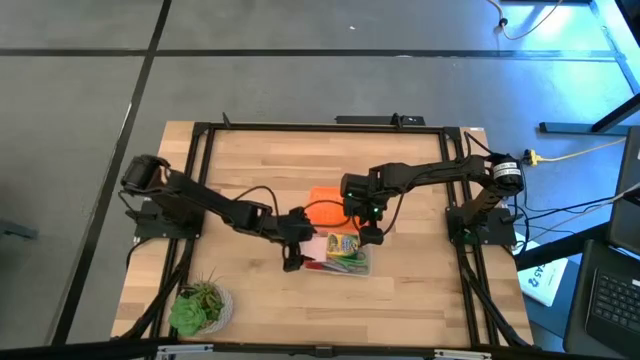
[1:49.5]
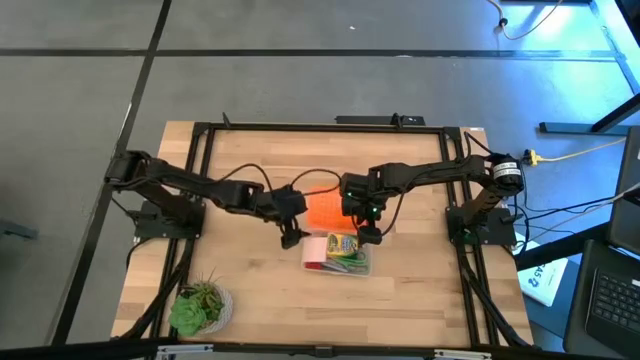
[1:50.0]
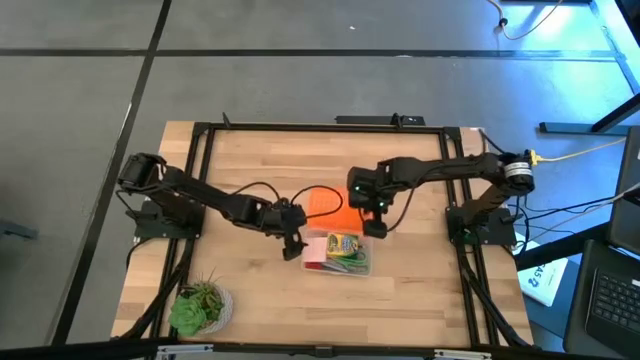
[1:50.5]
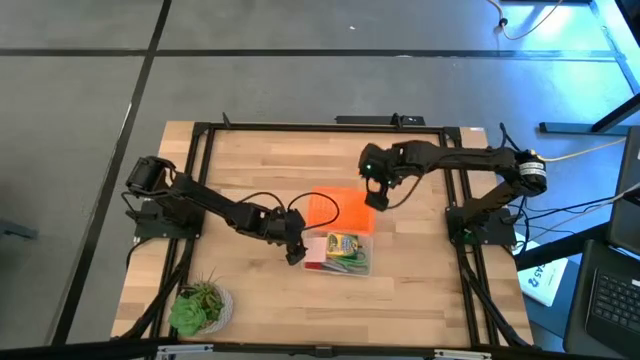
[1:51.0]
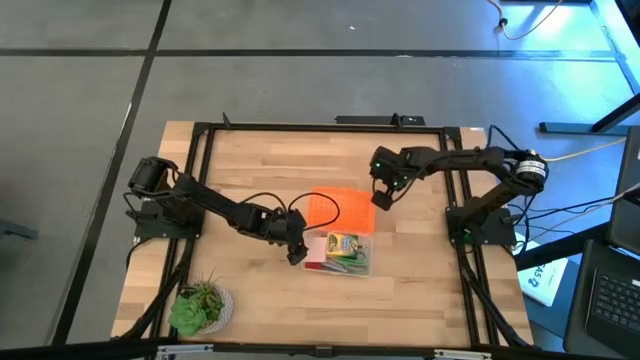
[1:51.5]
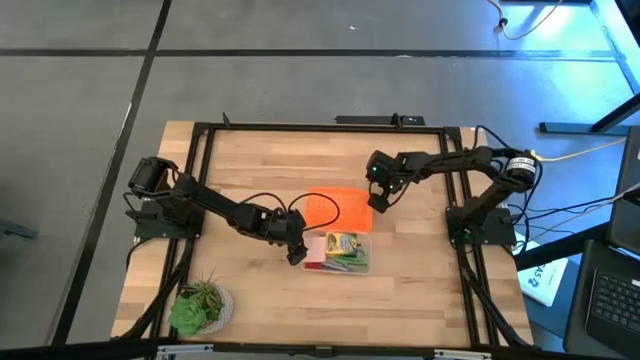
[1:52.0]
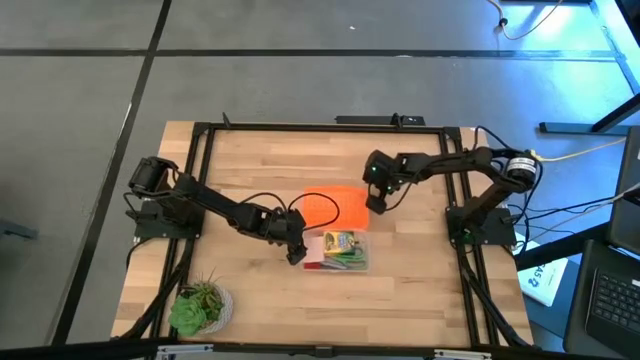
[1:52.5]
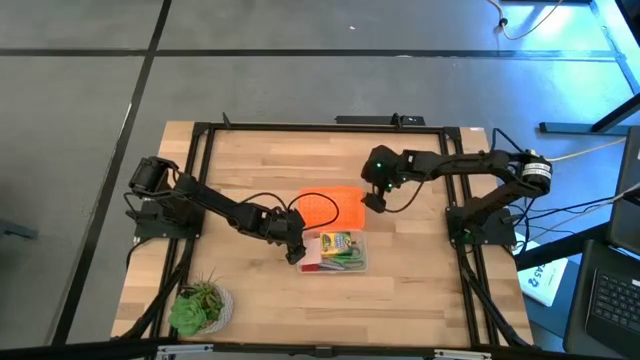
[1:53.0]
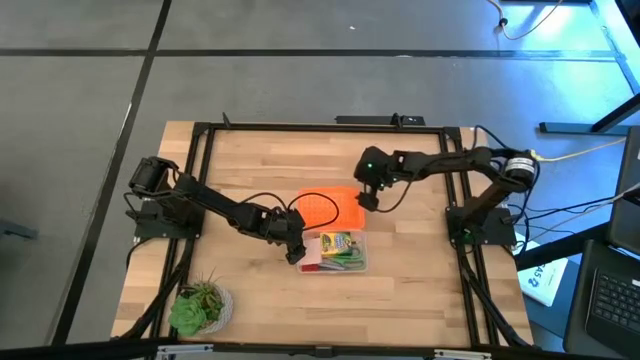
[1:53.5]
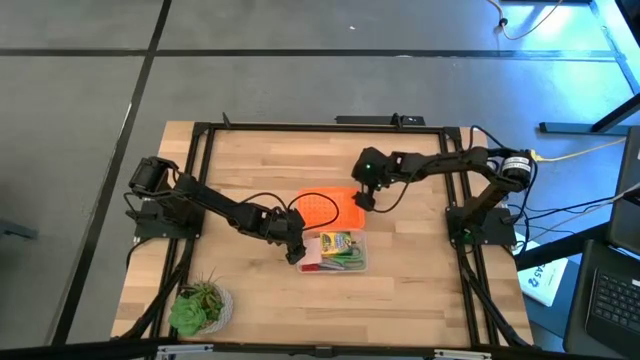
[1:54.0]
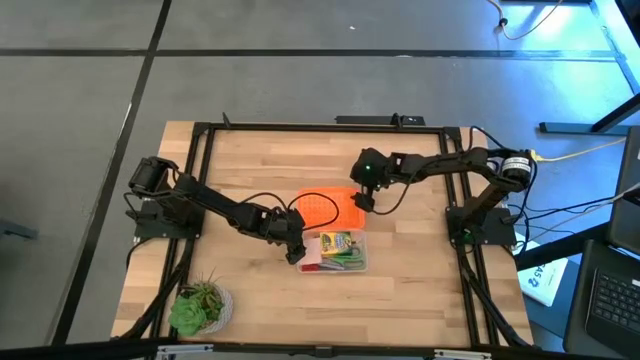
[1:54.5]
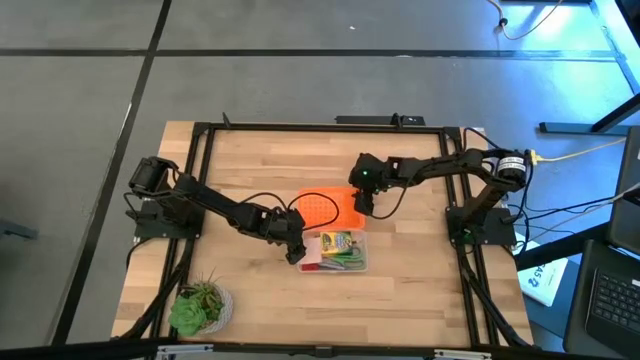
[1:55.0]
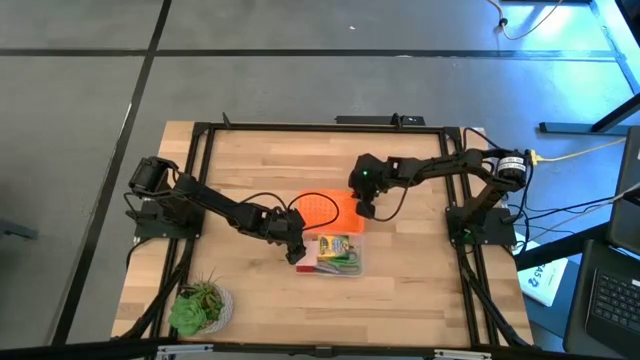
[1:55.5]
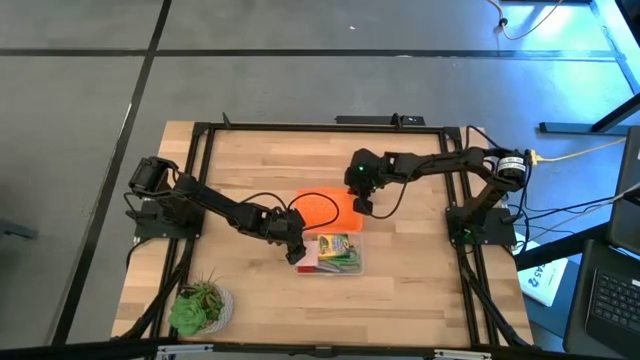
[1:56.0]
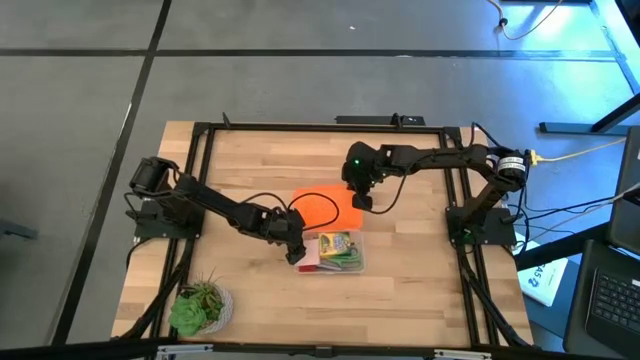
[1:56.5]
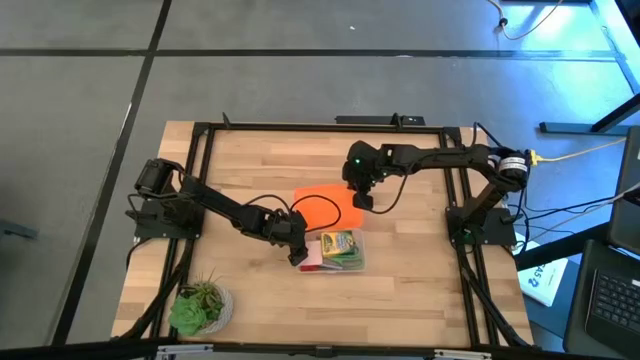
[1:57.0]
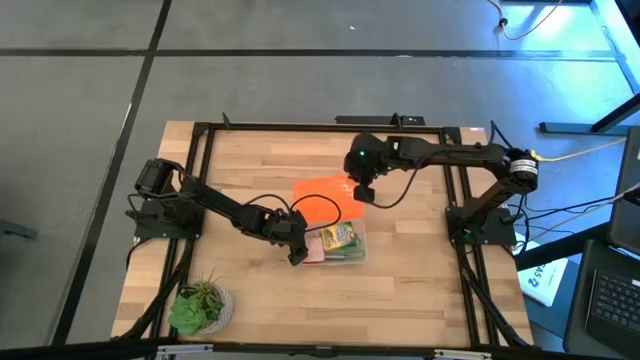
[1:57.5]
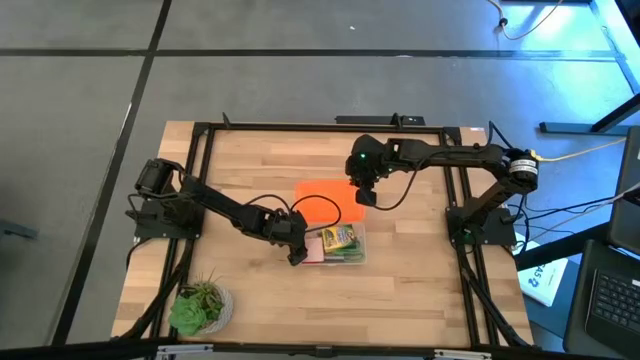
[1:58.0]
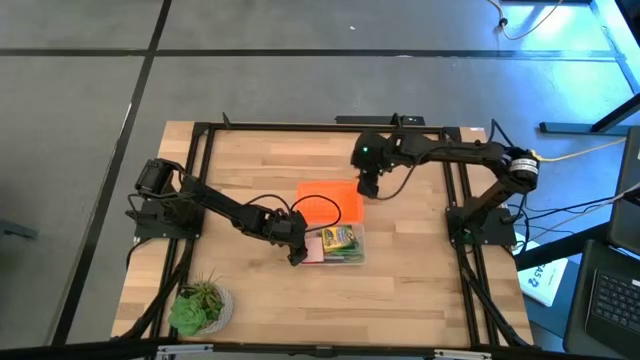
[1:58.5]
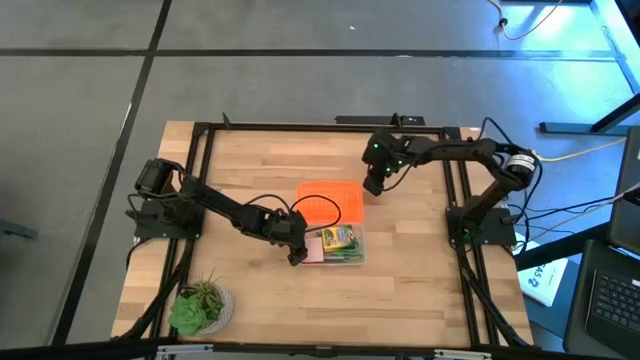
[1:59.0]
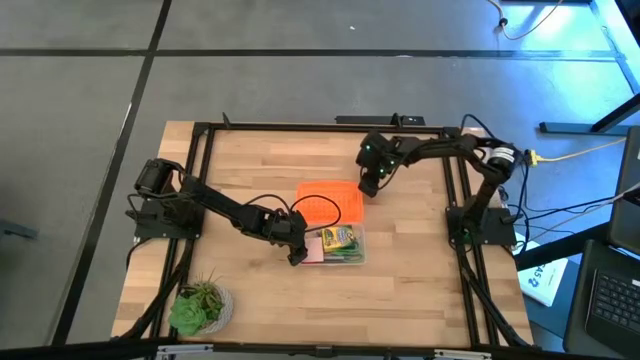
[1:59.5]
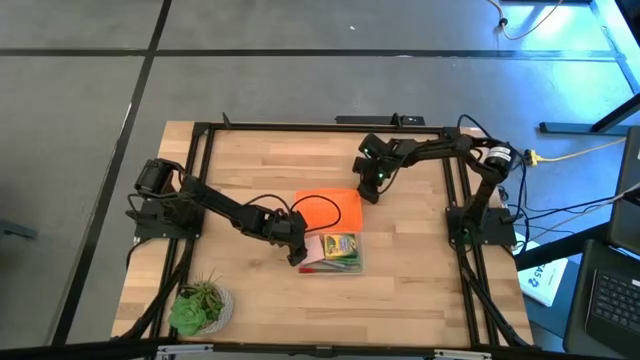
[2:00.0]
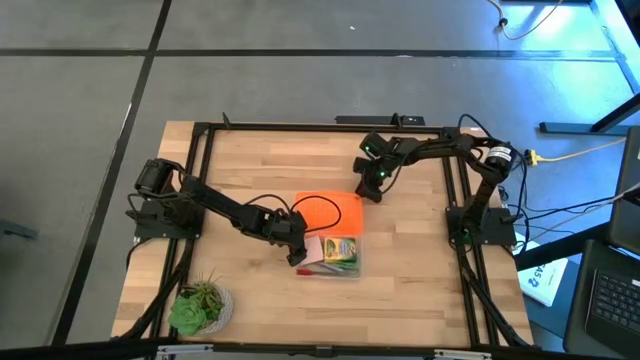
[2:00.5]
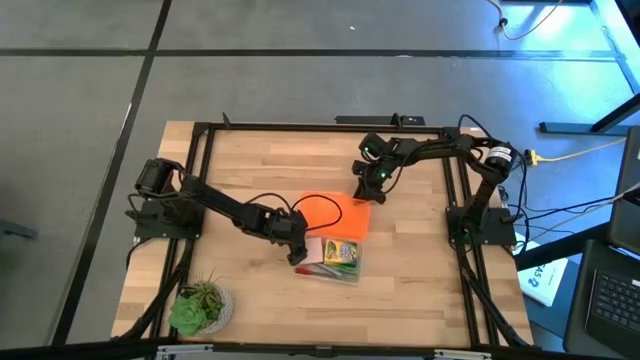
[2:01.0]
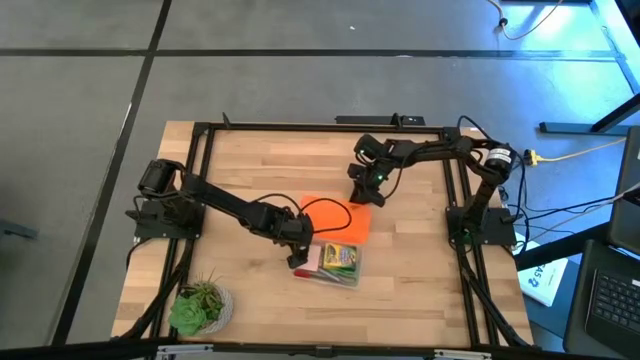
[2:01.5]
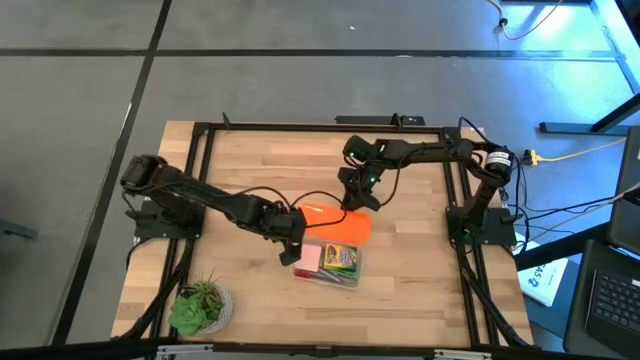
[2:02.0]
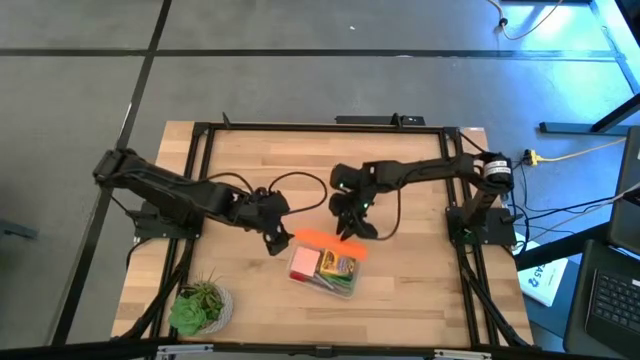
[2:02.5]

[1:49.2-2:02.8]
Task: Pack school essentials
Close the orange supply box

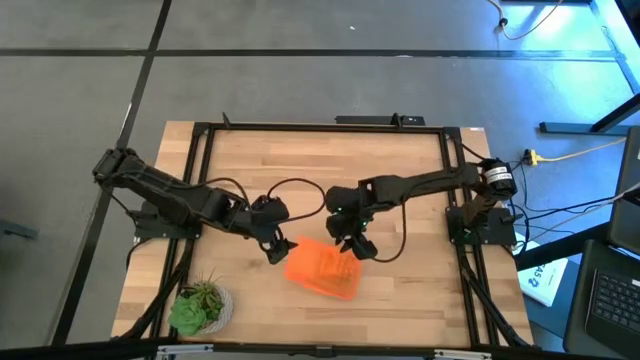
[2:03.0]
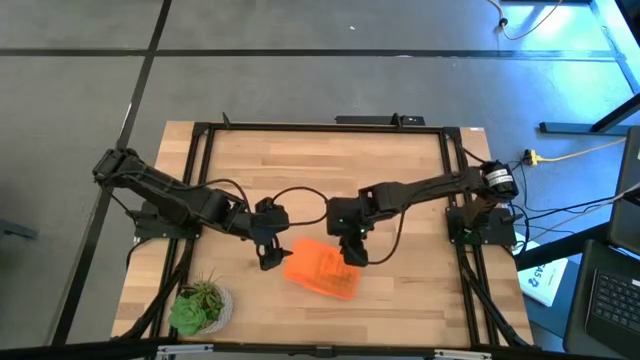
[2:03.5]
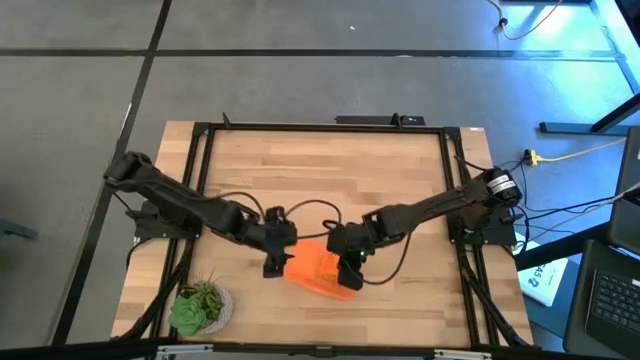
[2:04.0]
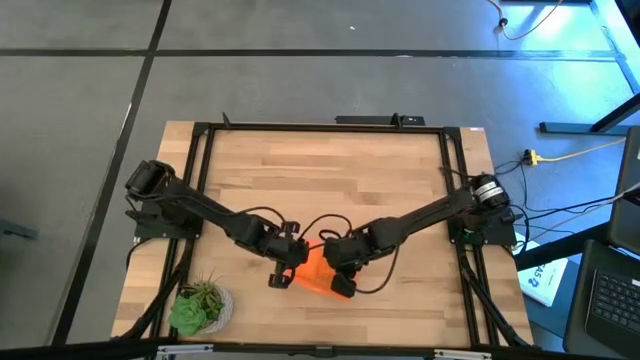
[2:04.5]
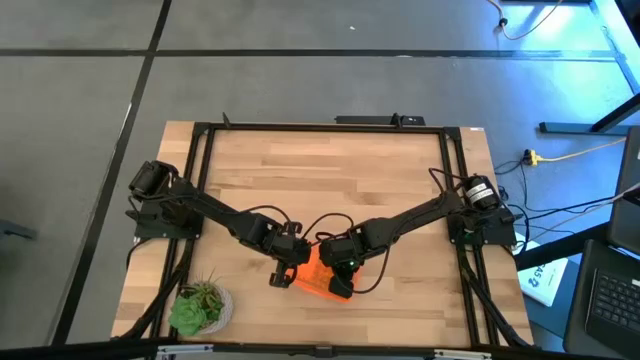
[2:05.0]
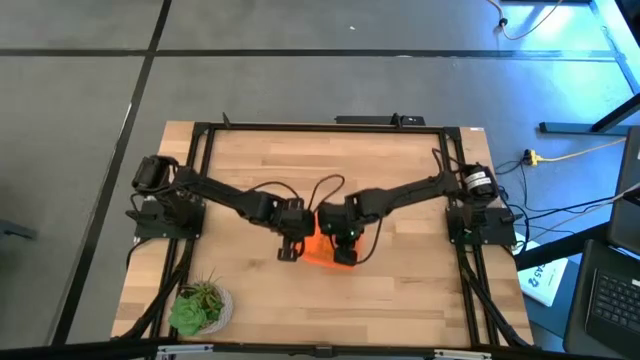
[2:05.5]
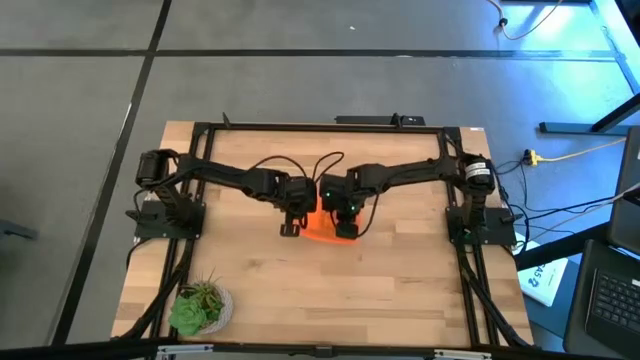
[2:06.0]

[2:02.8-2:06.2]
Adjust the orange supply box

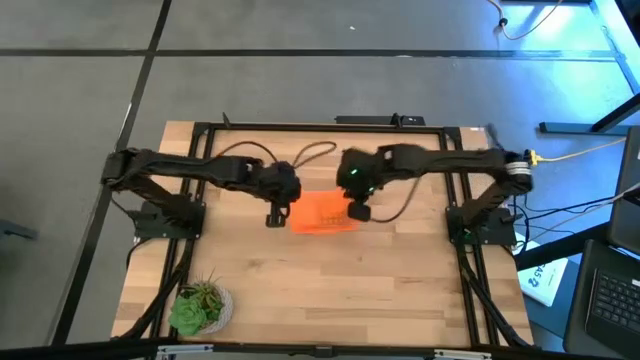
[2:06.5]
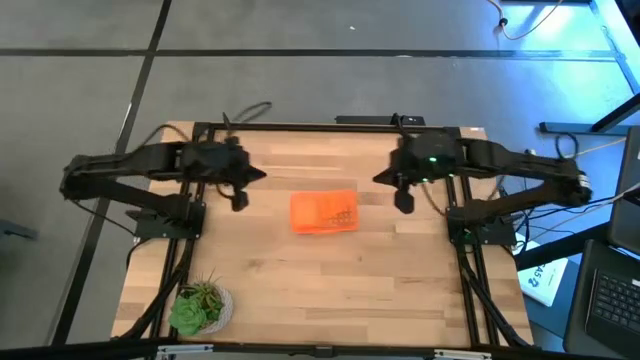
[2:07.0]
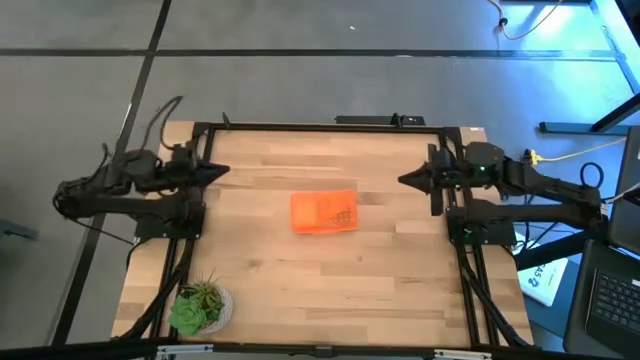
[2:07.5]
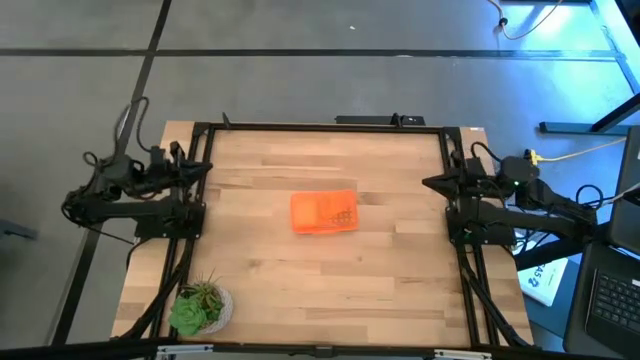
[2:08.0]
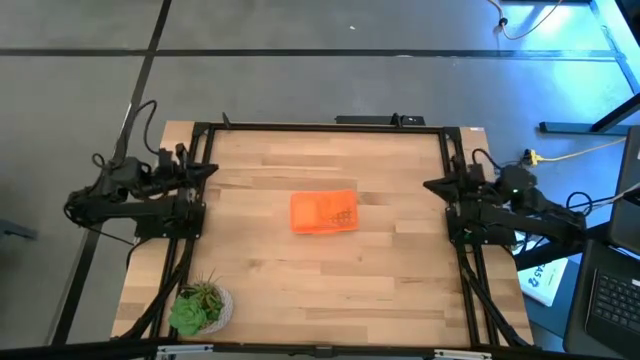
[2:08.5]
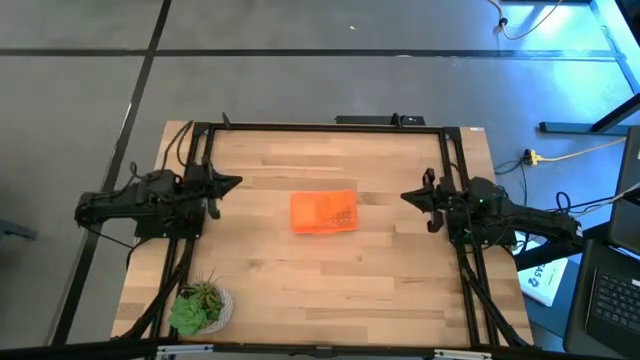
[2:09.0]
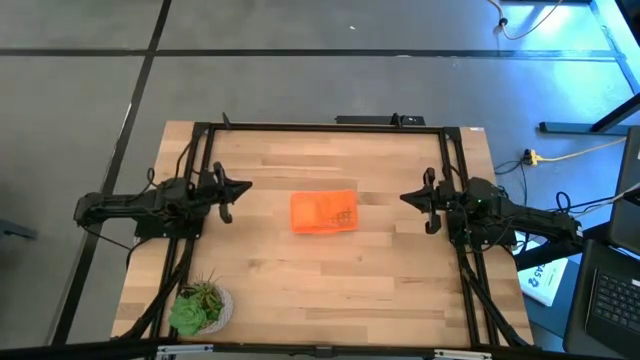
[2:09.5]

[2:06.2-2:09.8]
Return to Home Position

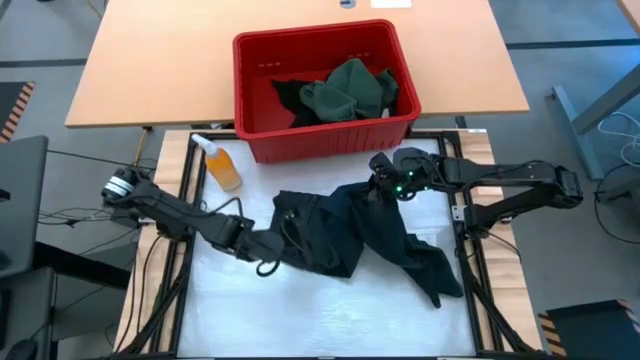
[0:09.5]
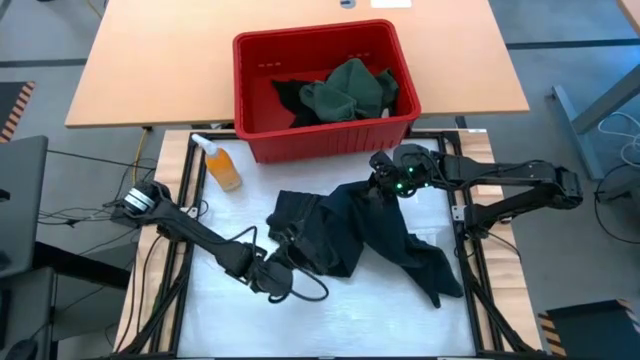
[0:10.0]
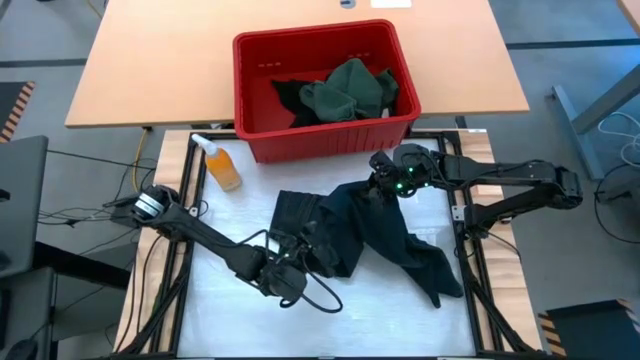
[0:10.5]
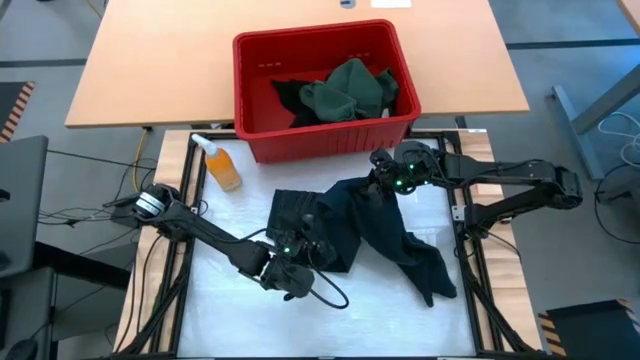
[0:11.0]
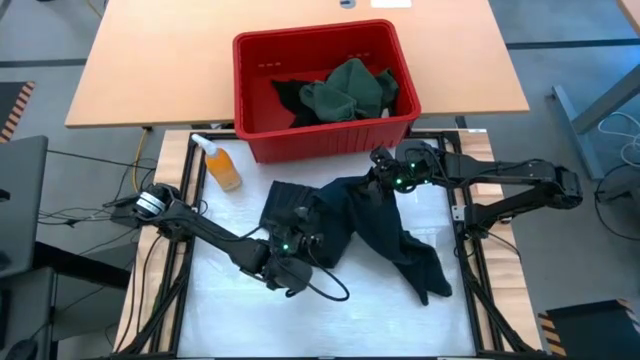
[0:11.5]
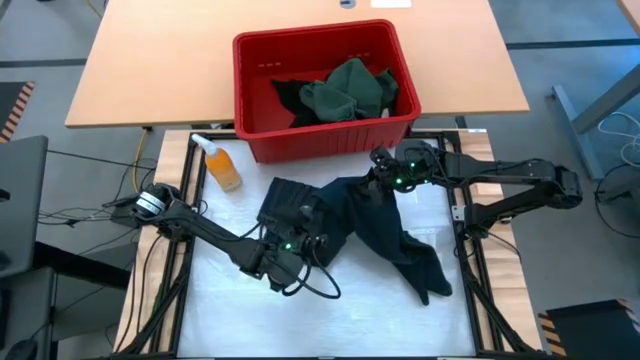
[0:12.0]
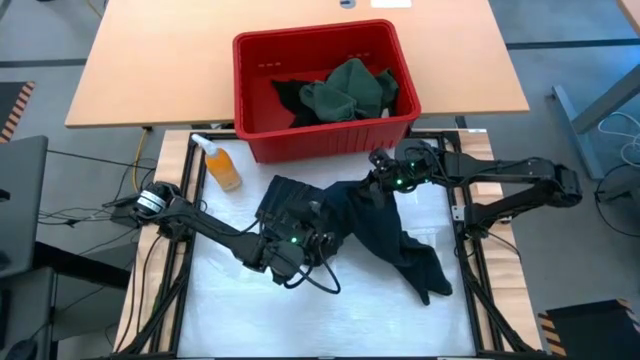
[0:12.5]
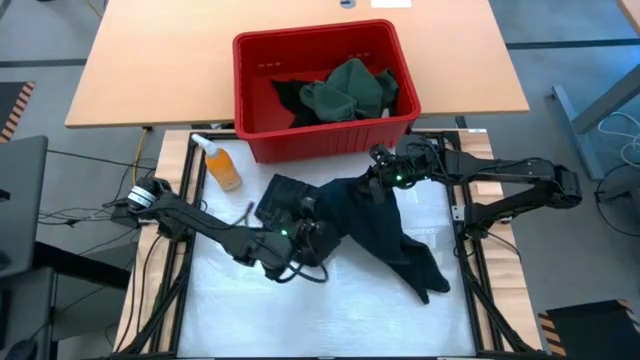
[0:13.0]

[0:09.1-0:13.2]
Task: Fold laundry
Fold the dark blue pants
